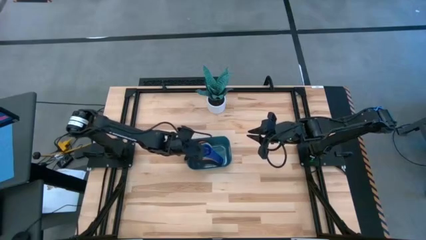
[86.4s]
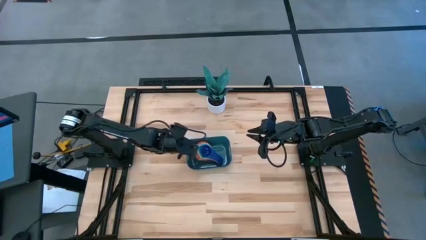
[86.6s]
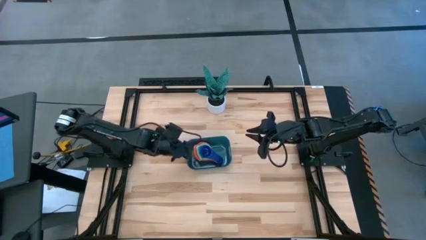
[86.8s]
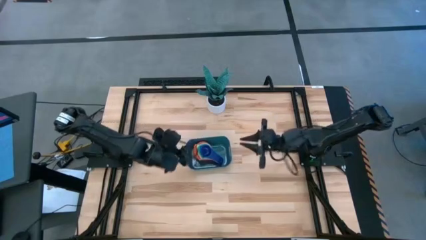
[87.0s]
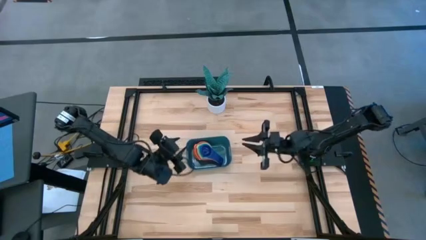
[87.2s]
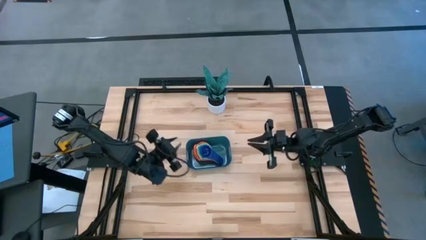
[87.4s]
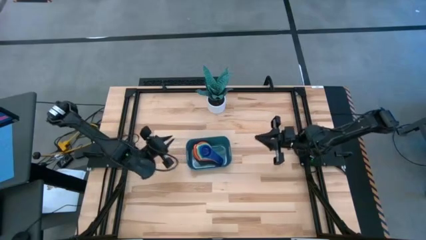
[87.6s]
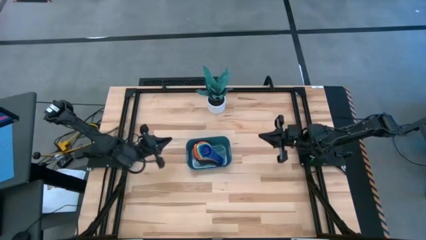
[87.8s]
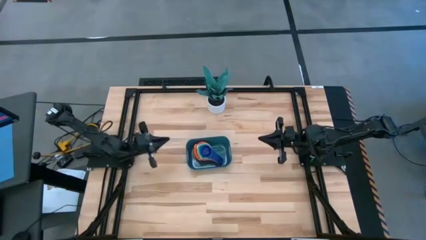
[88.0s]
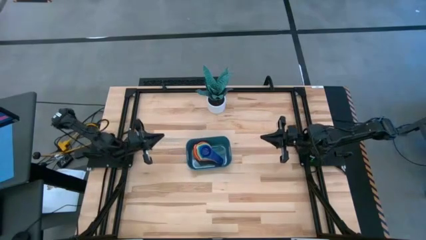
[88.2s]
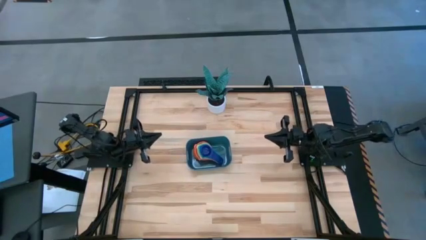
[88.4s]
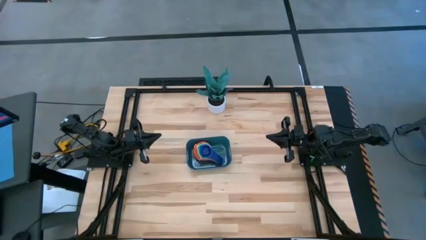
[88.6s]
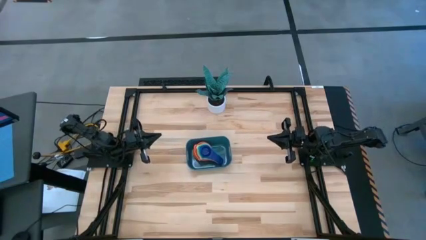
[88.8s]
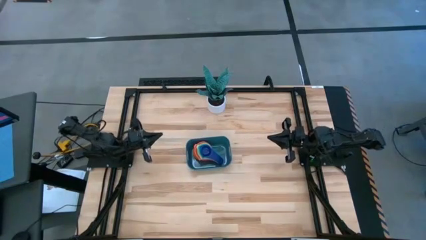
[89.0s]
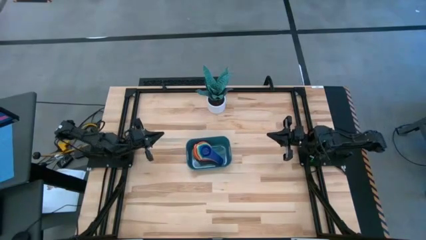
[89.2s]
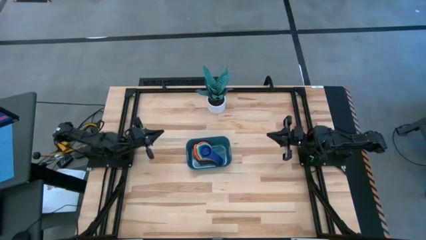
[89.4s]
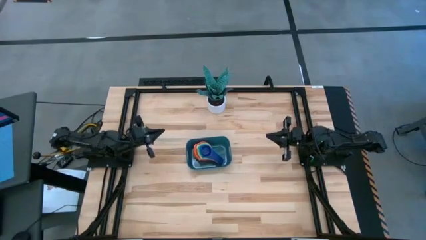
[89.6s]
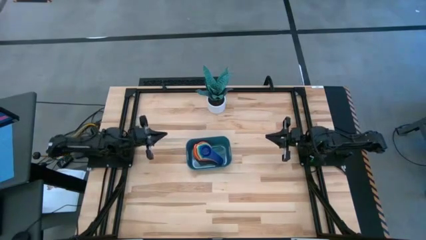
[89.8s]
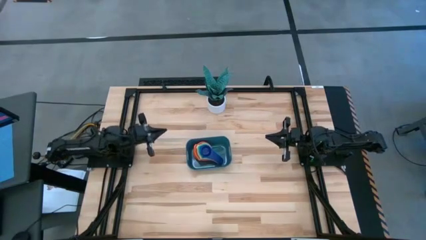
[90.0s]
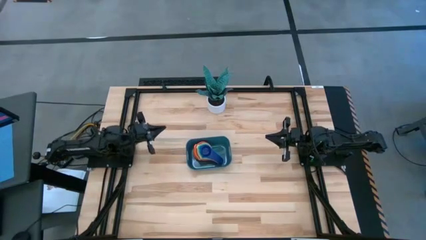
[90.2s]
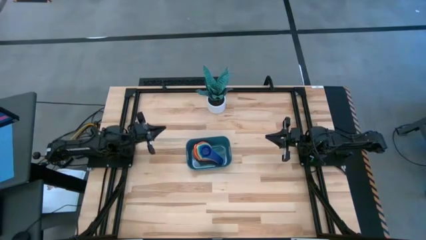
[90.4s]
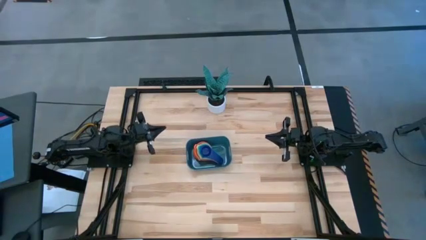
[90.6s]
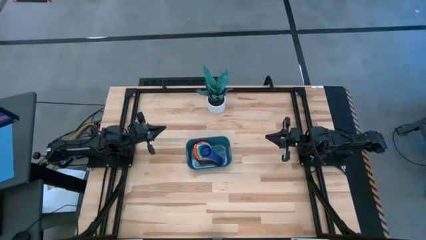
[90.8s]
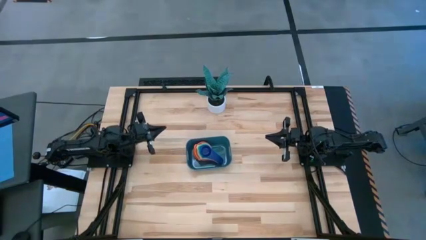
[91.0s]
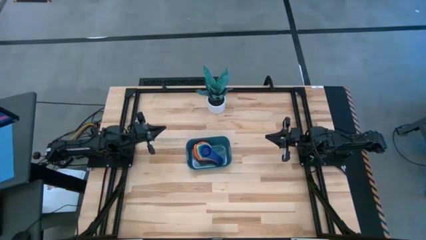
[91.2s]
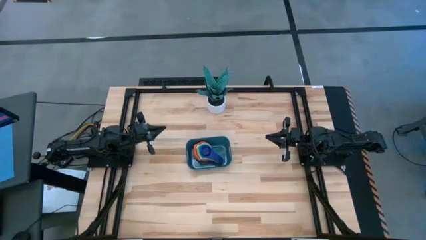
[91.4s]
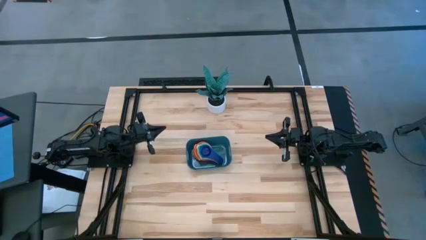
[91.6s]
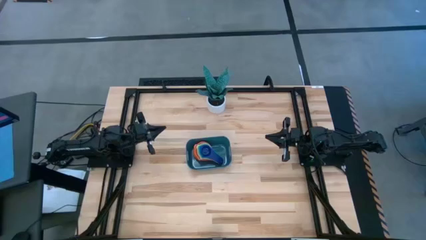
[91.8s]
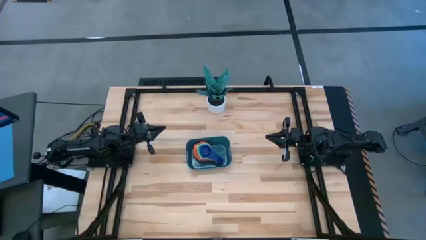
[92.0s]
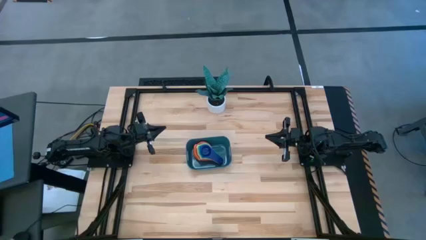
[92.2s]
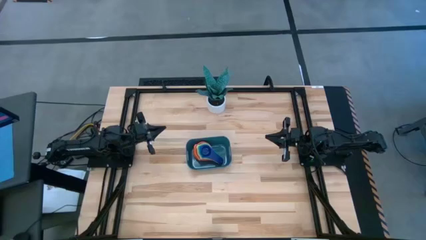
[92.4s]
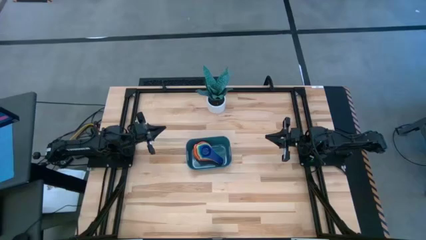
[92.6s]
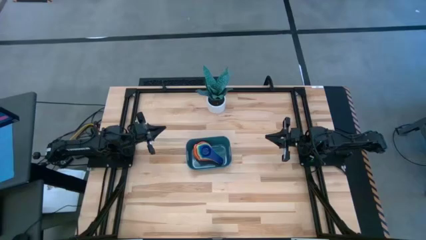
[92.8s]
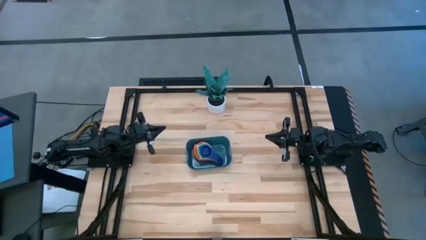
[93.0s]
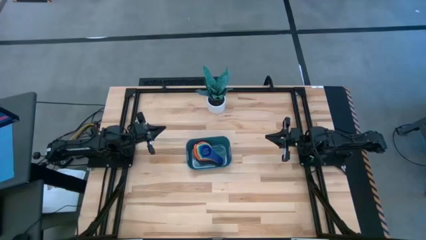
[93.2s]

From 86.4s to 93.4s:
Task: Nest measuring cups in basket
Return to Home Position

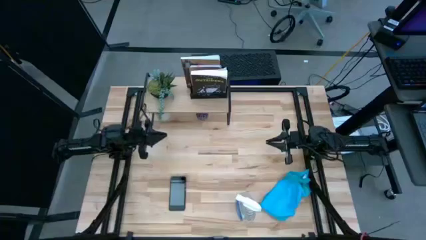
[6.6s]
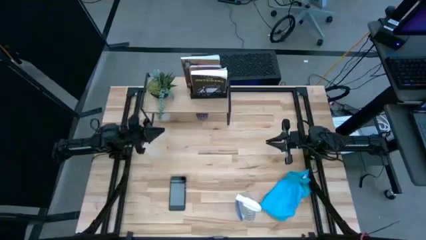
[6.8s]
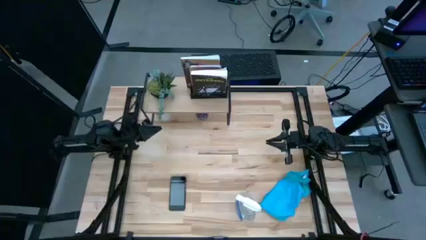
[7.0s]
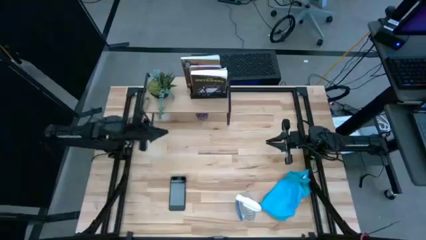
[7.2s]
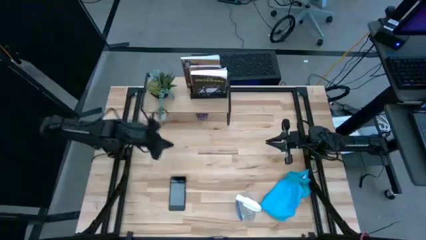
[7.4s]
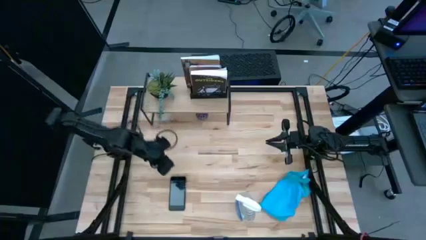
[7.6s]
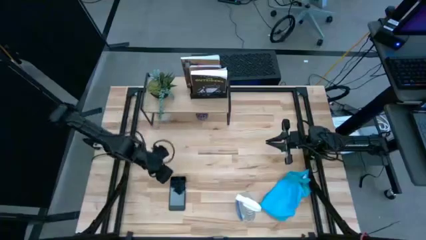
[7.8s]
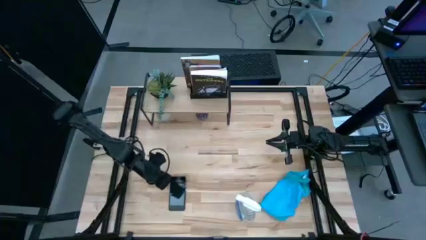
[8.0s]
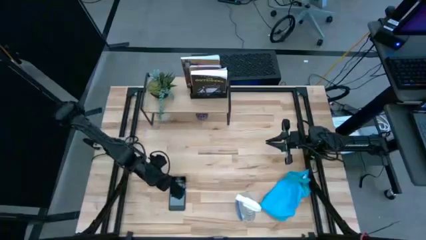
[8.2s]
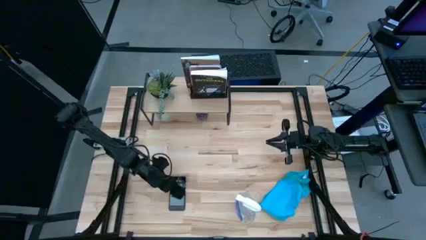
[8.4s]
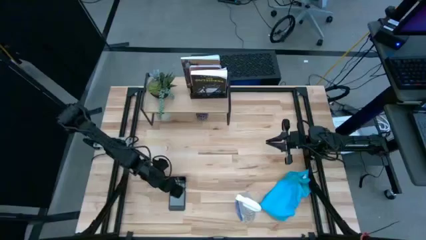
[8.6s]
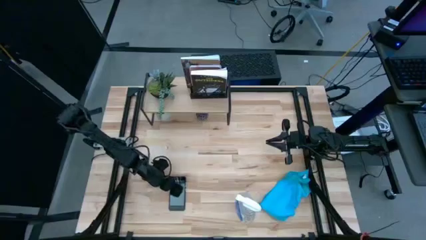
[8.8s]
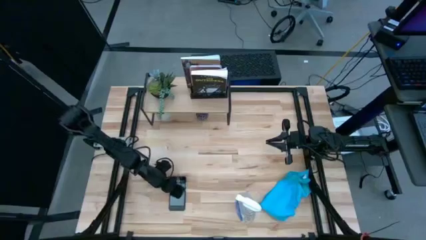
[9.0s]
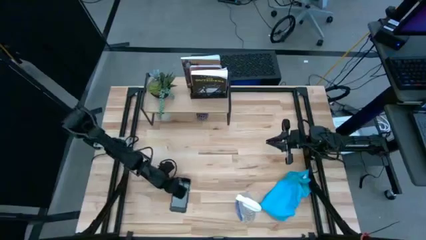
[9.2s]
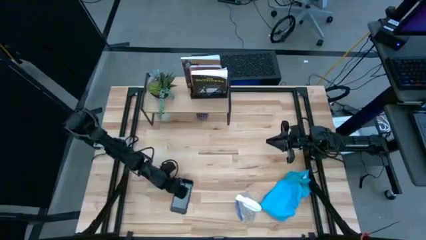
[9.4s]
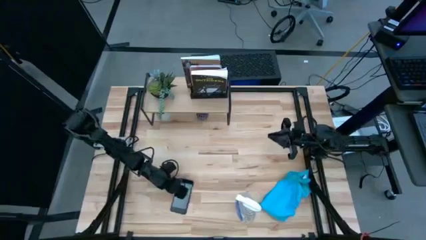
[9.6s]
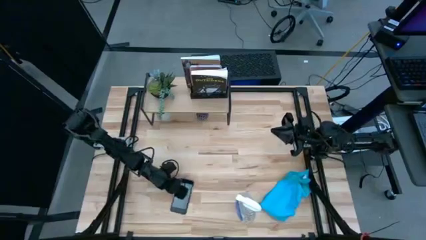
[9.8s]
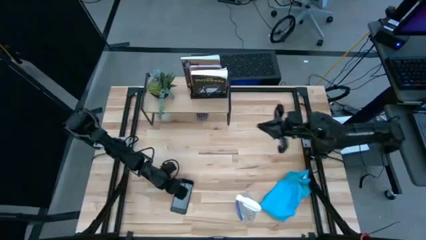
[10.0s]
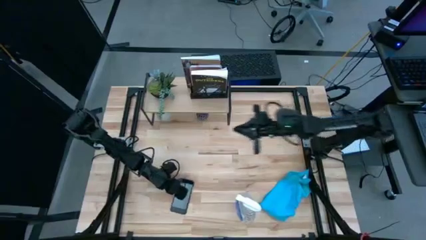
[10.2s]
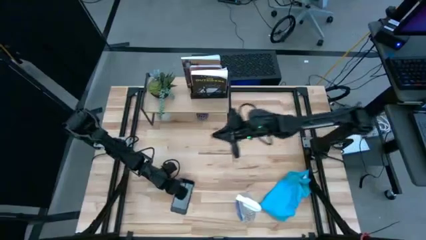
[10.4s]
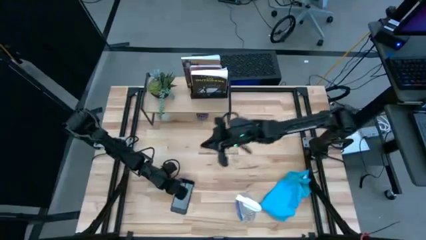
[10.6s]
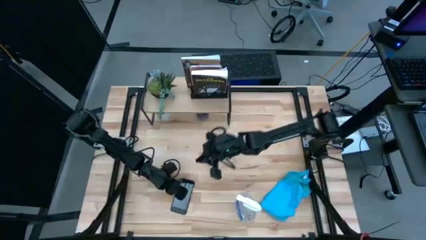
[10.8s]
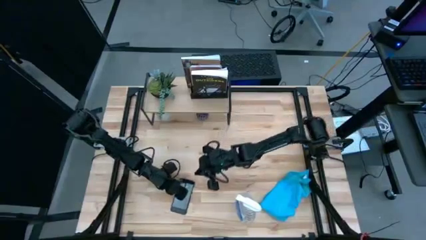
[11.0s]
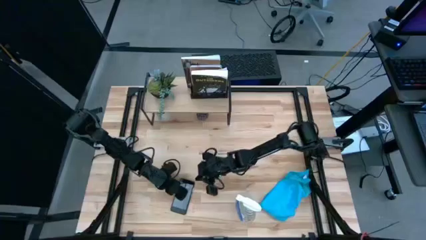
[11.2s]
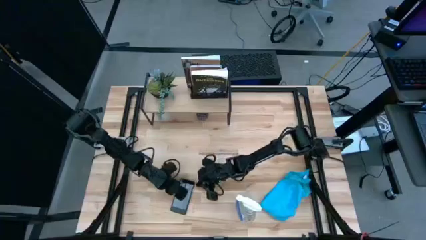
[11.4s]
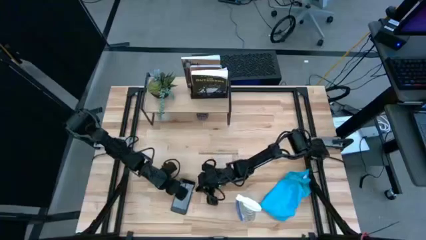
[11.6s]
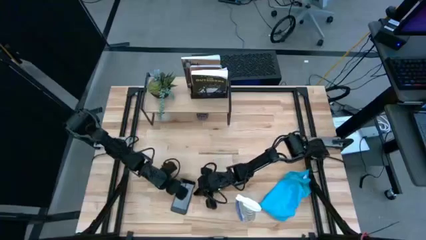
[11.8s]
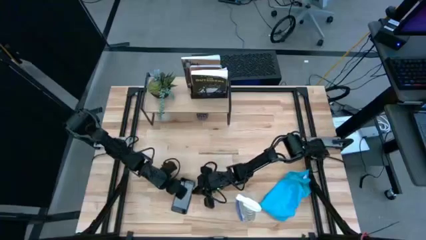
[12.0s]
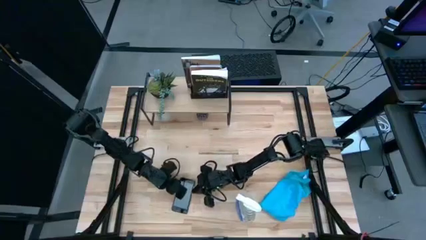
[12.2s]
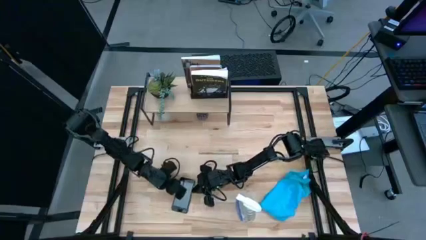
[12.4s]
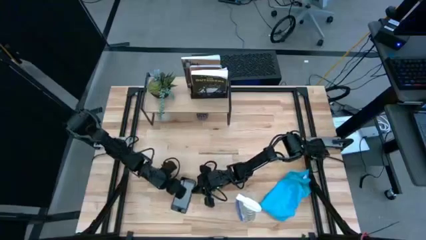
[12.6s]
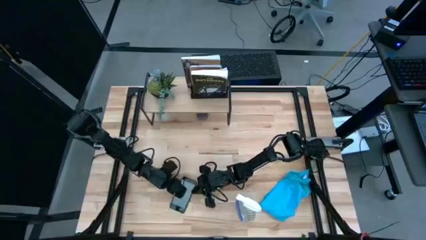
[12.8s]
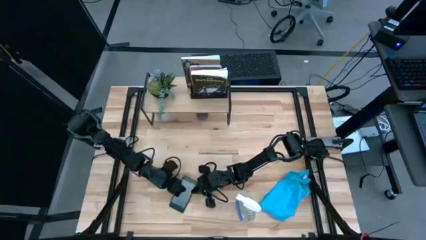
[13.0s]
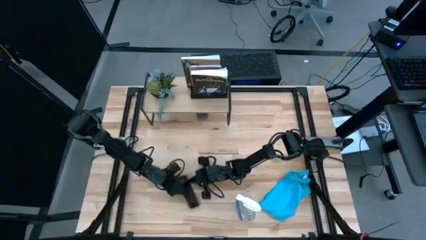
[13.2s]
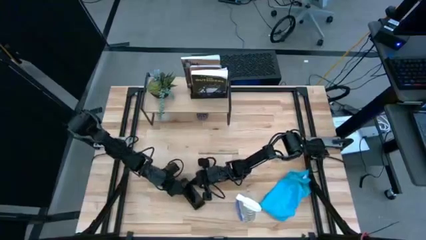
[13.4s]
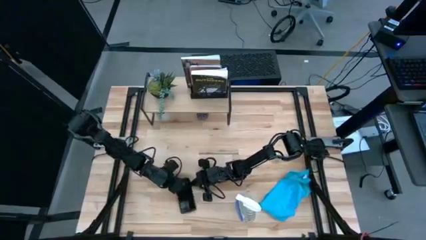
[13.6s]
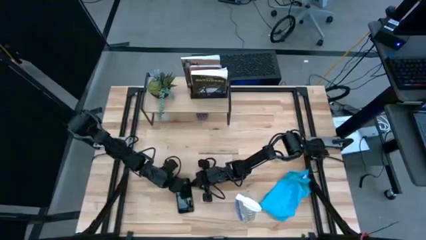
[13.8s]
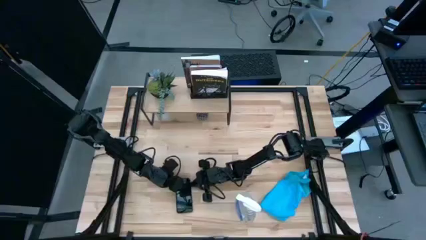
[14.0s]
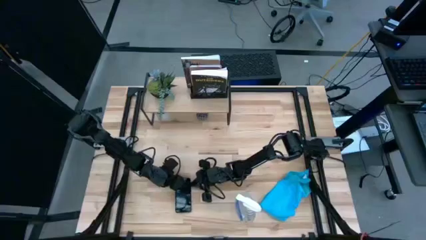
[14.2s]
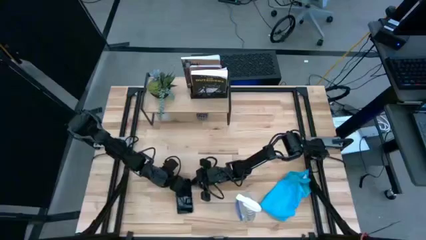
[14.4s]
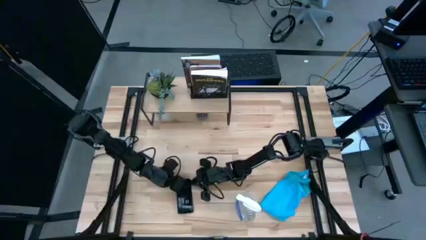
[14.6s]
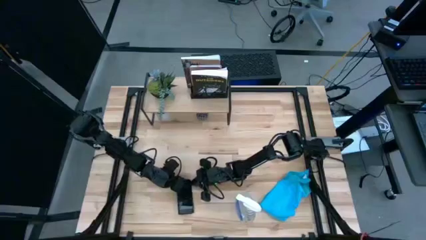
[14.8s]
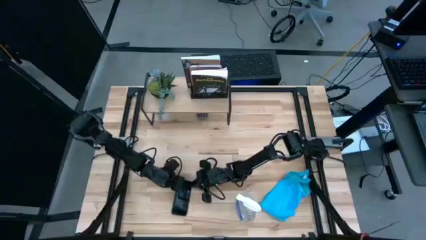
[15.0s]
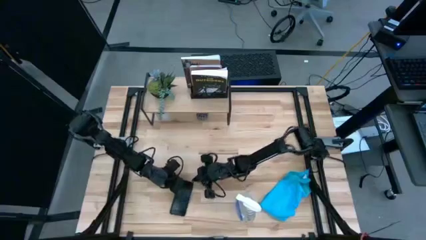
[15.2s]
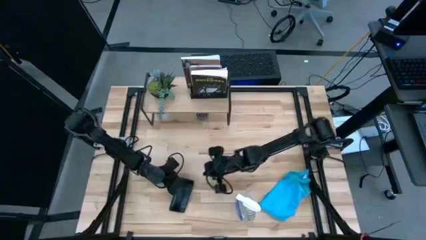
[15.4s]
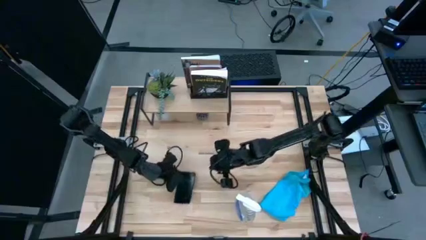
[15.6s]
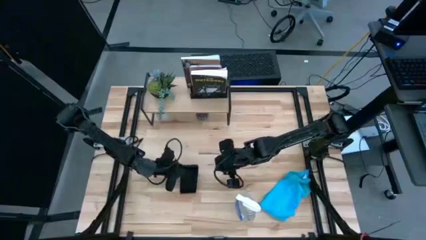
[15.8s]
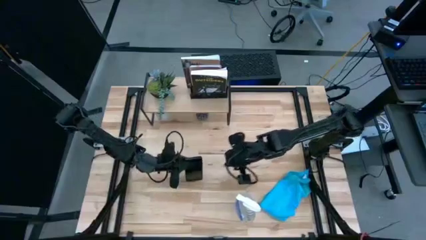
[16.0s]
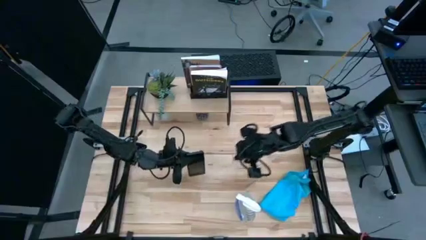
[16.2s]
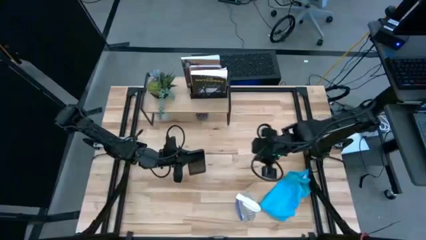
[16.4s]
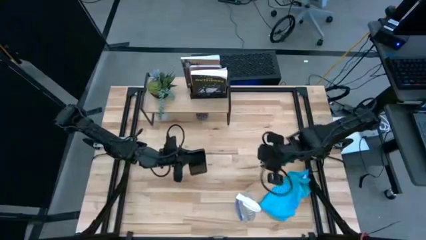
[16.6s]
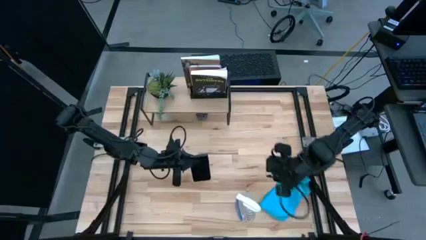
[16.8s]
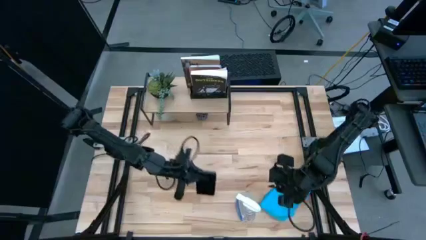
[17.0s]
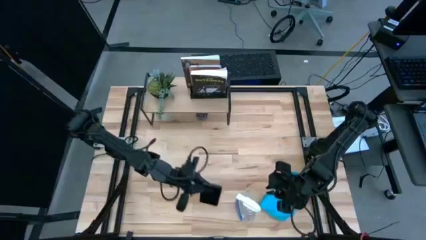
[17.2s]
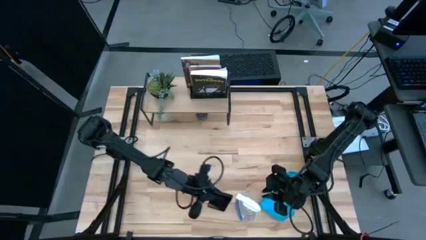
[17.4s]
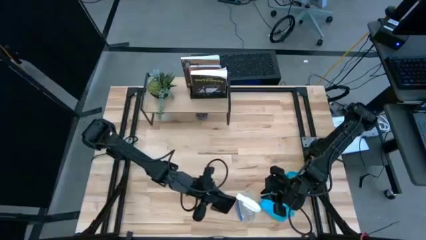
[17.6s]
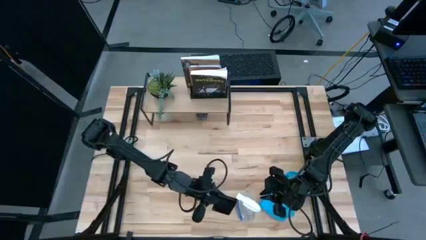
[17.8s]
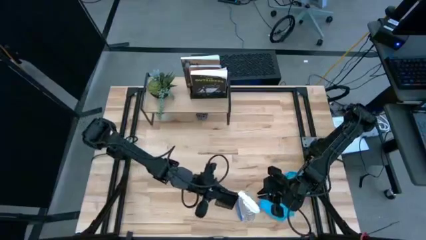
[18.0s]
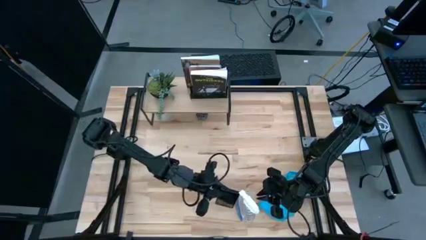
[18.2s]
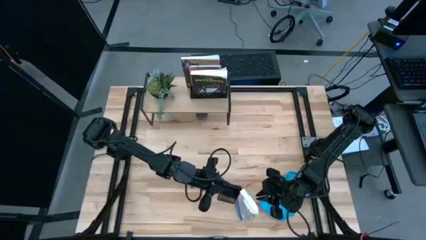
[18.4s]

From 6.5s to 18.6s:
Task: Apply microfiber cloth
Spray the front of the black cellphone using the transparent spray bottle
